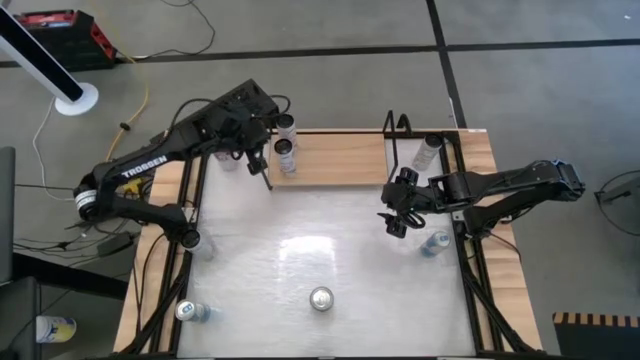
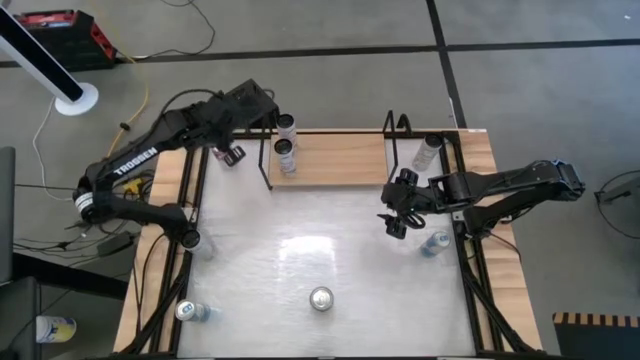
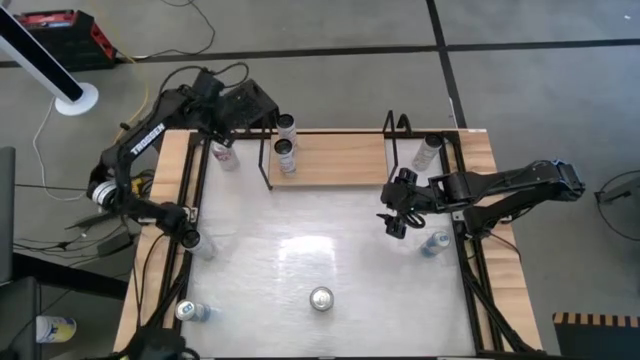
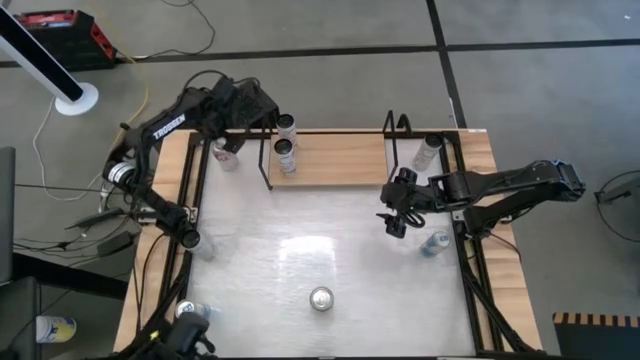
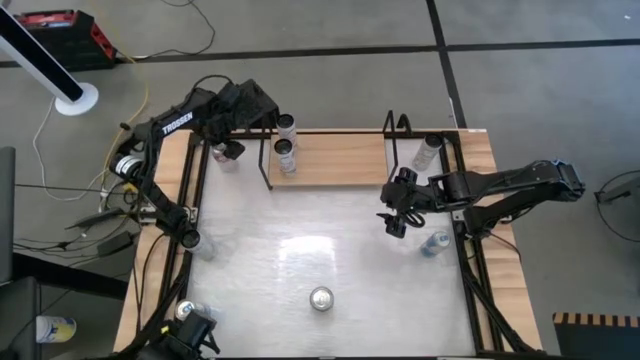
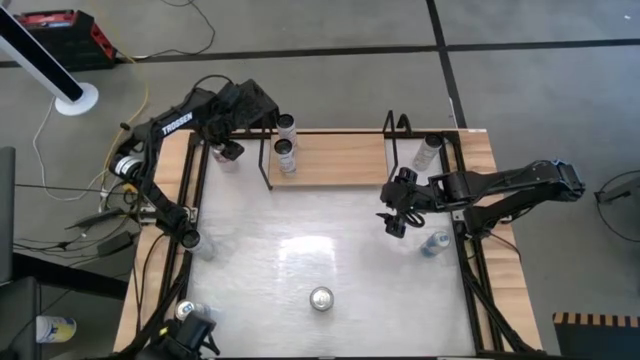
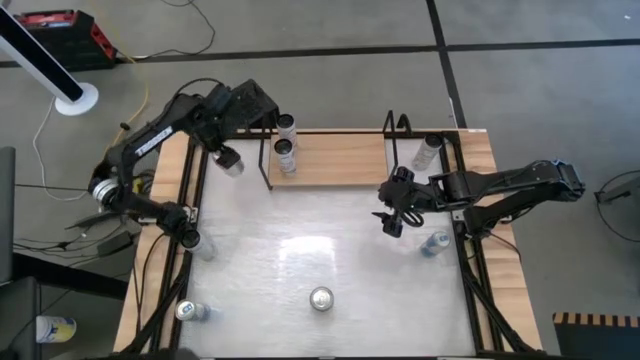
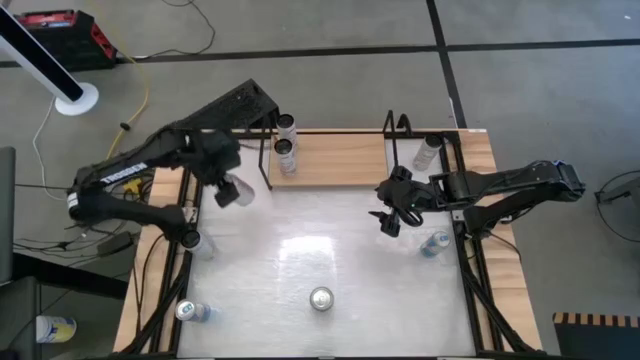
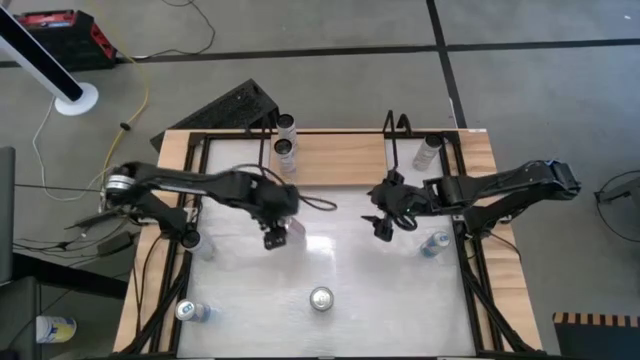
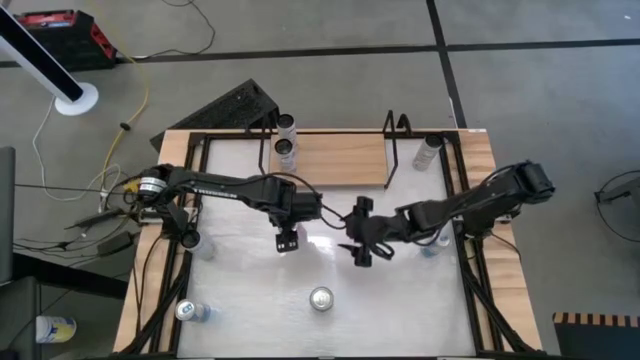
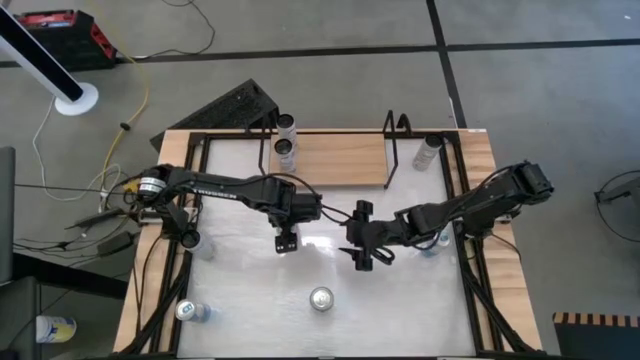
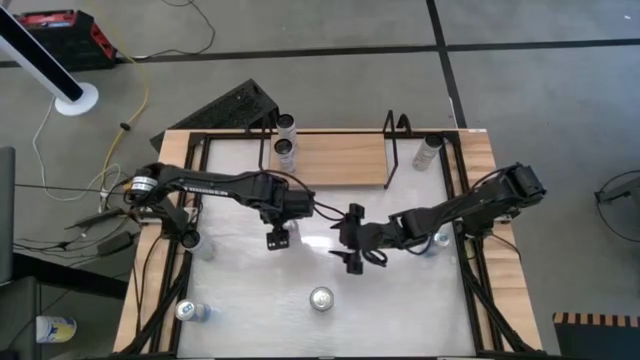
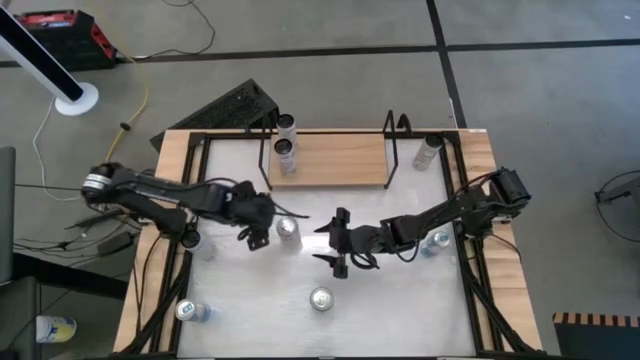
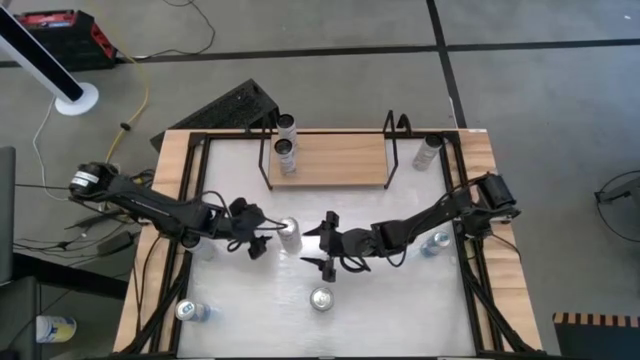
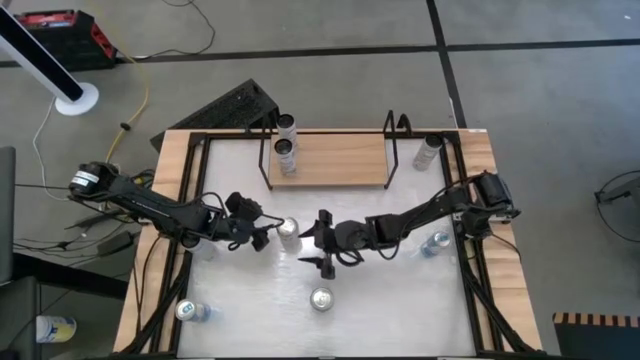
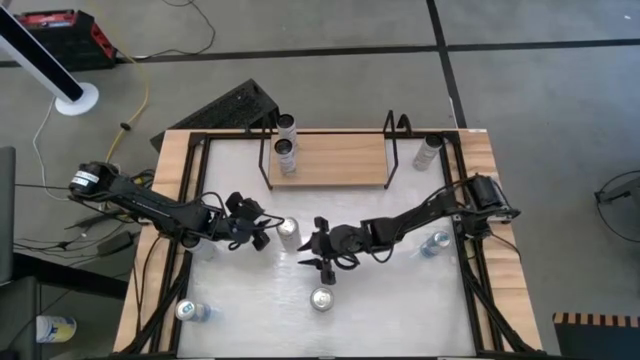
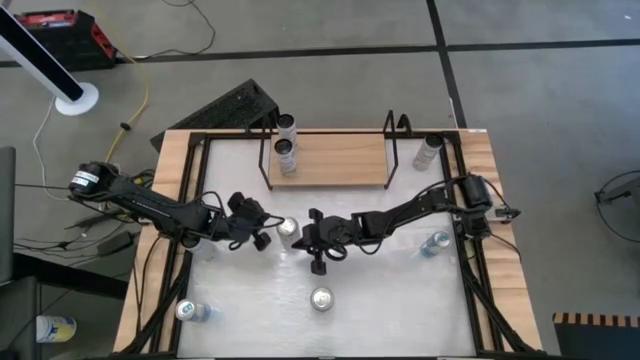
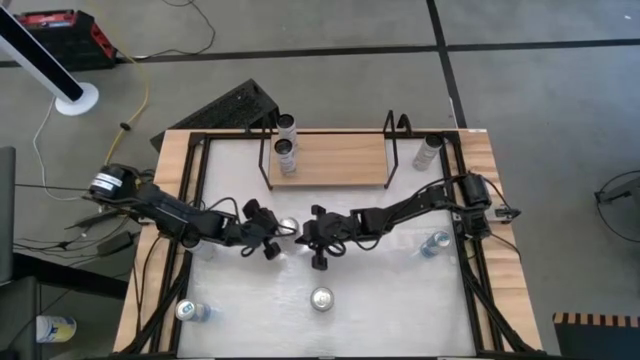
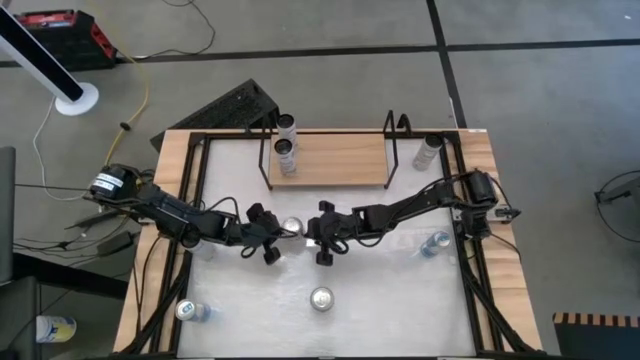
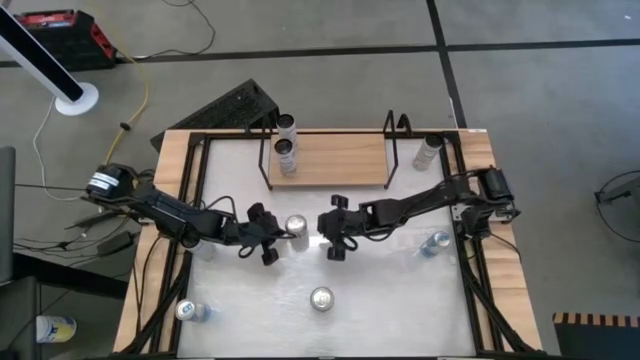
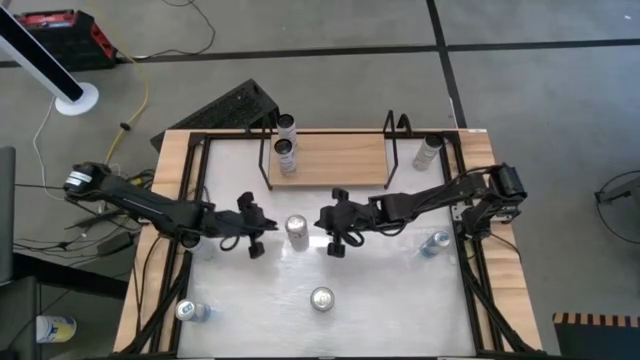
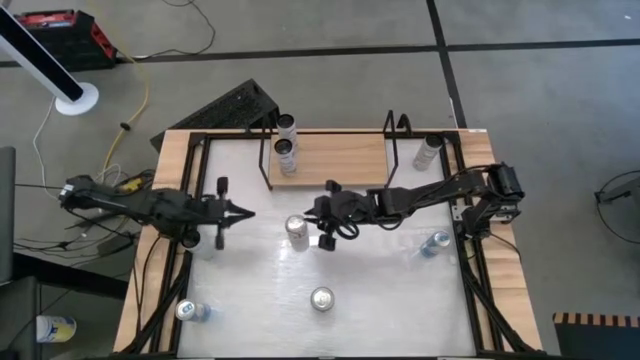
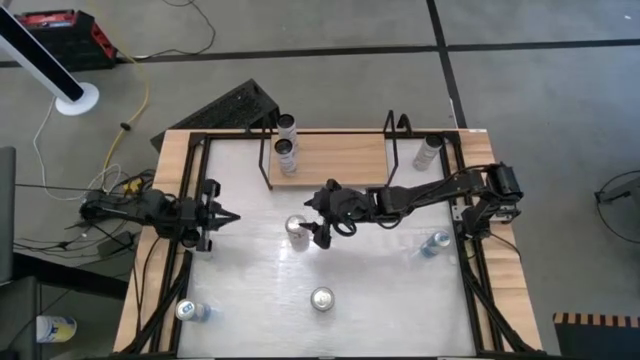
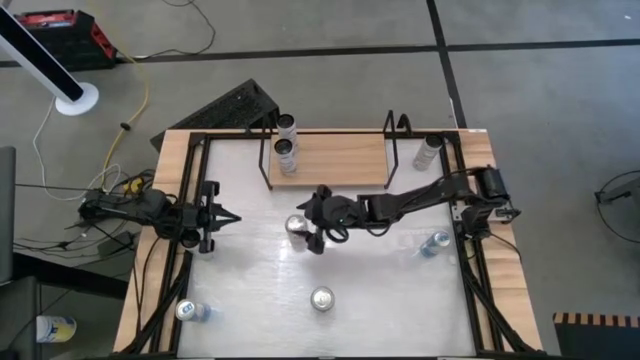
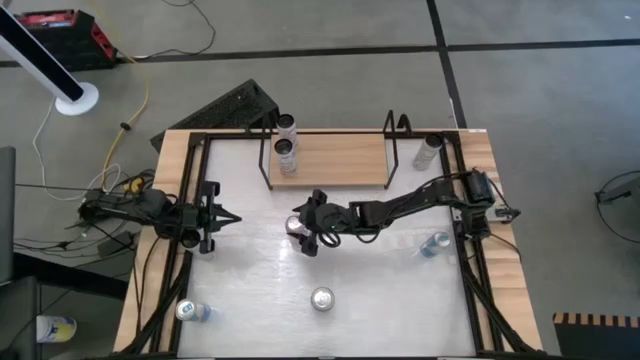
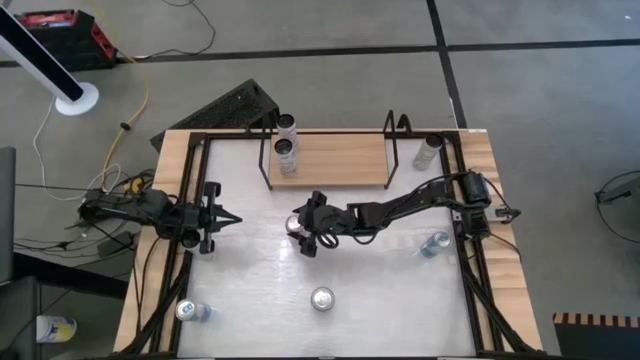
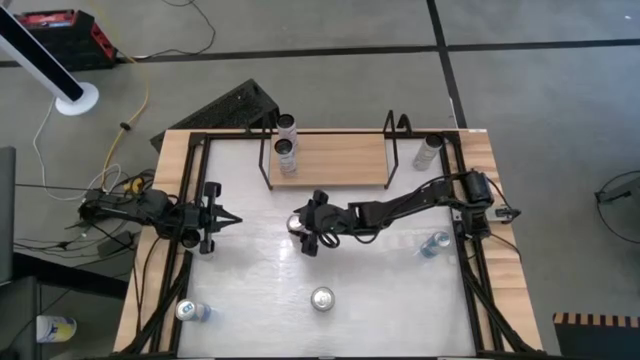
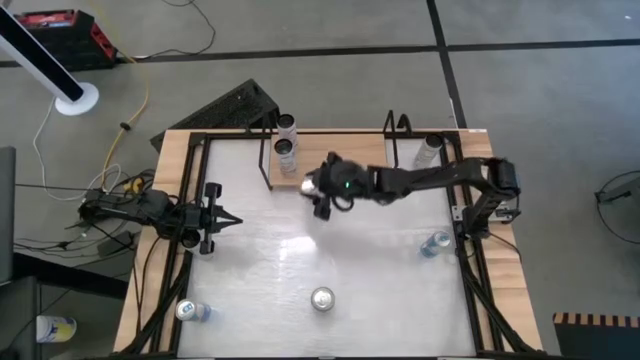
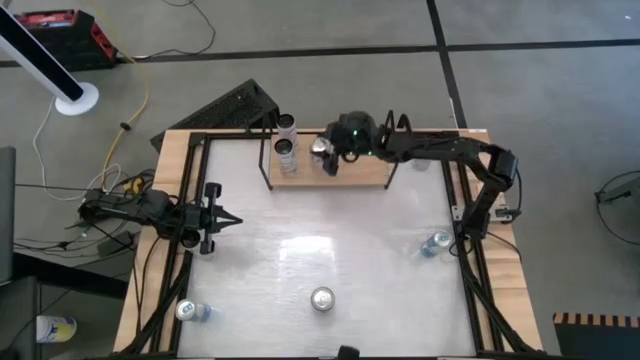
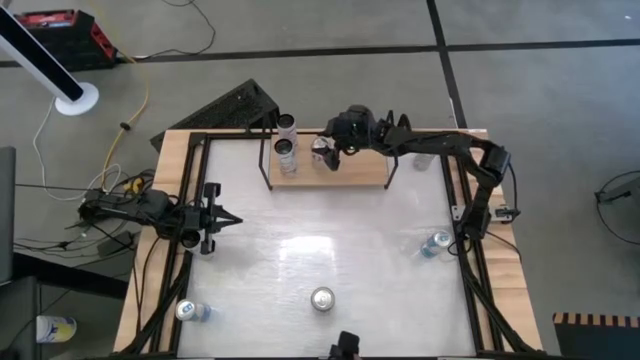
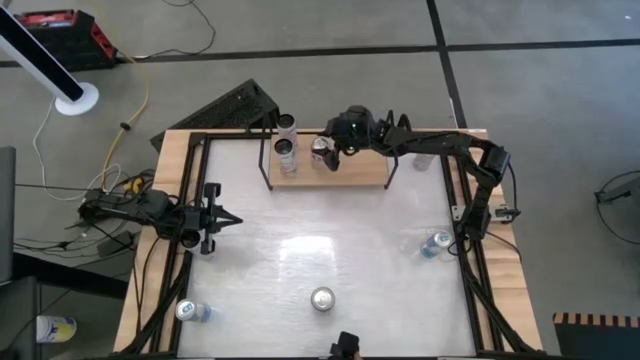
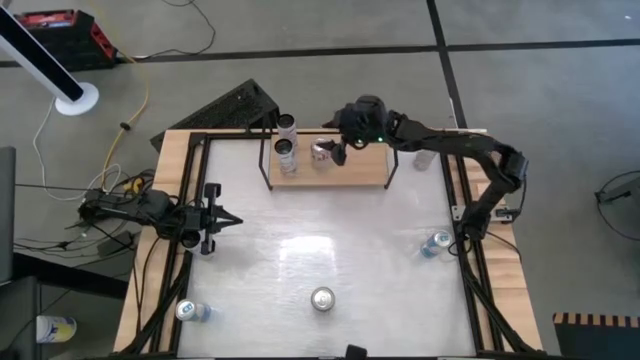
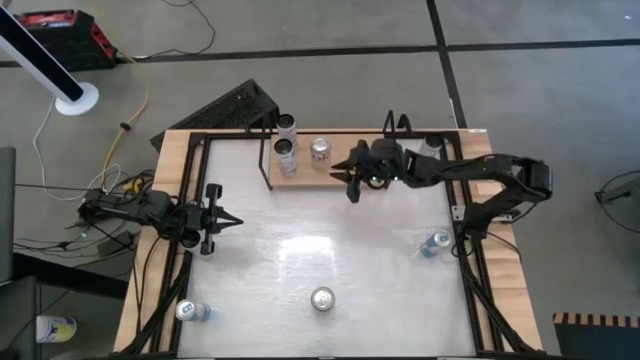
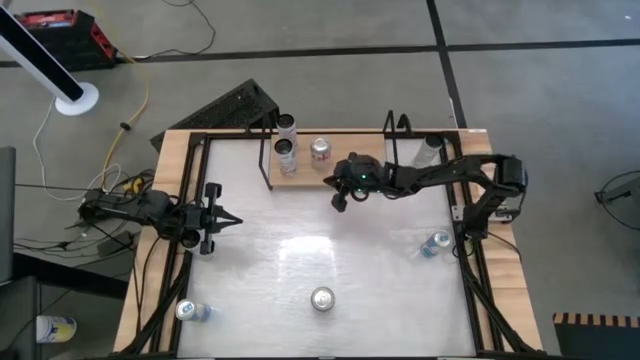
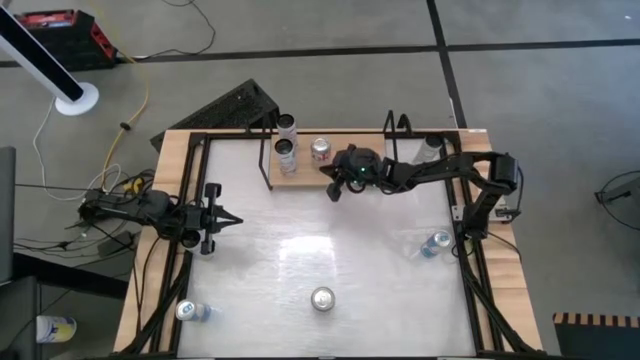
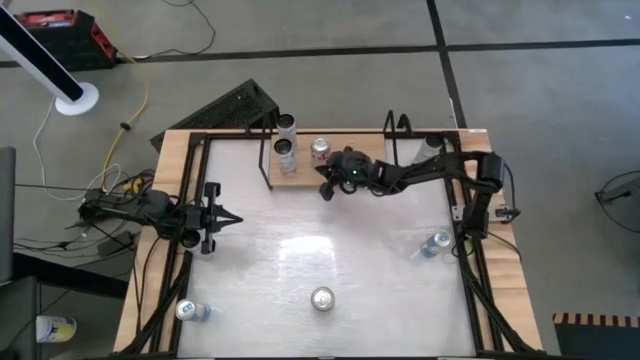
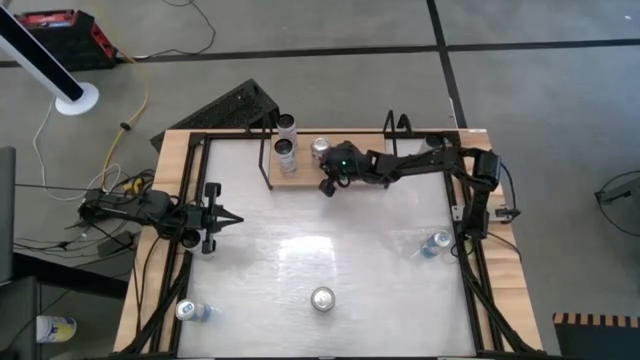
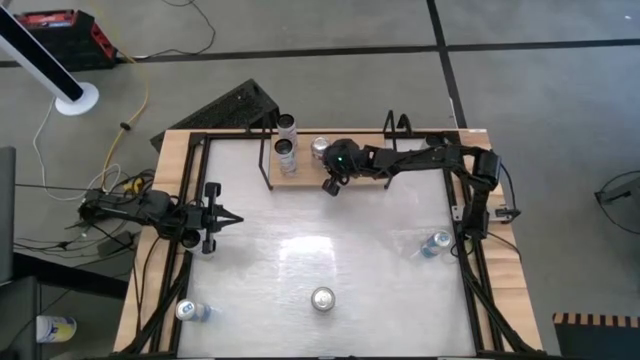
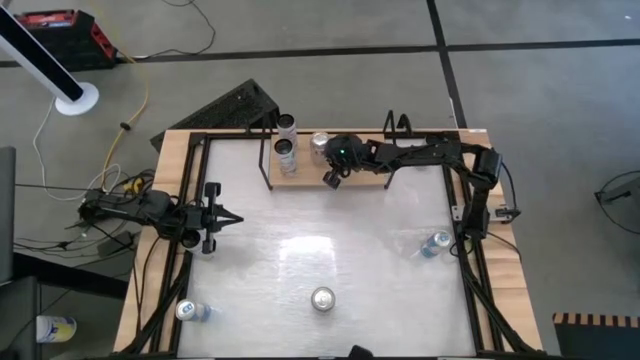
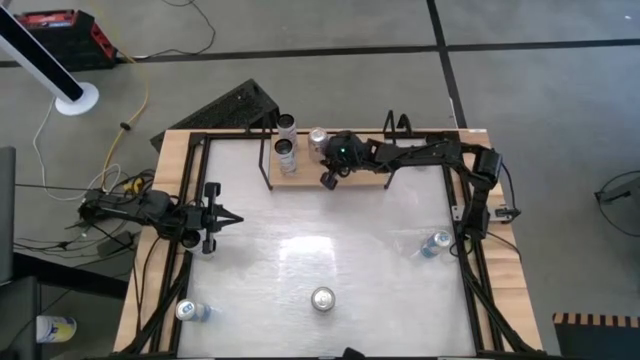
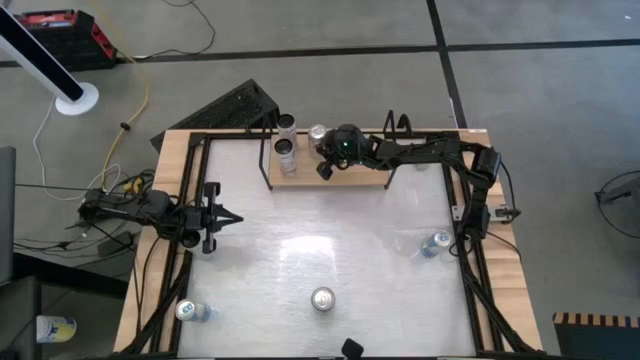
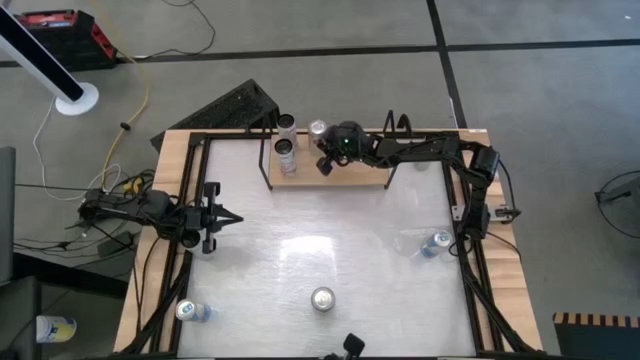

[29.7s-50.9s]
Task: Place canned beverage on shelf
Put the top red-silver soda can on the shelf
